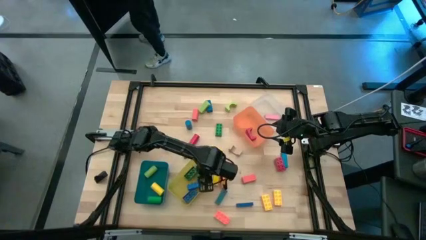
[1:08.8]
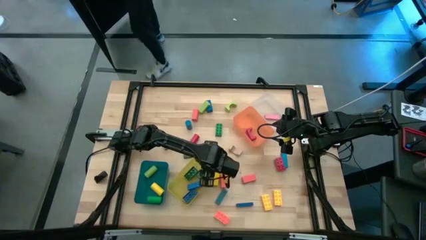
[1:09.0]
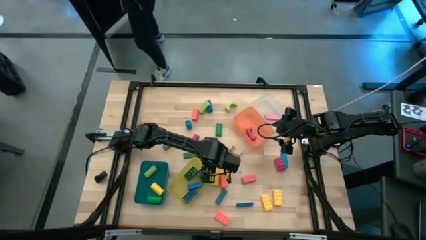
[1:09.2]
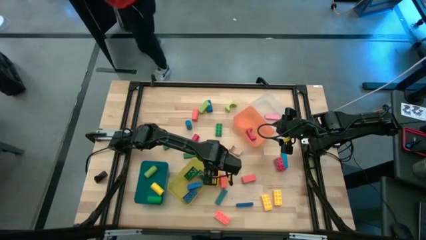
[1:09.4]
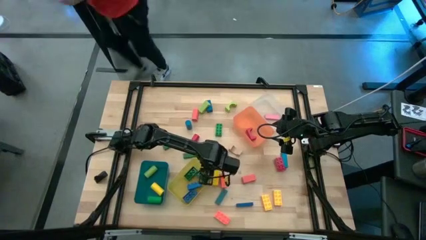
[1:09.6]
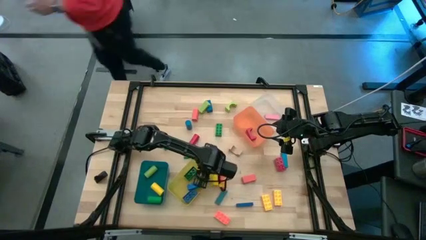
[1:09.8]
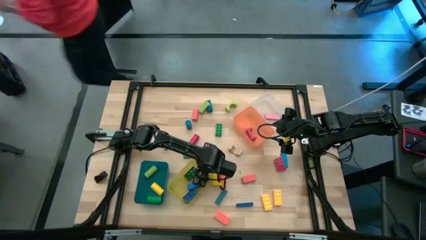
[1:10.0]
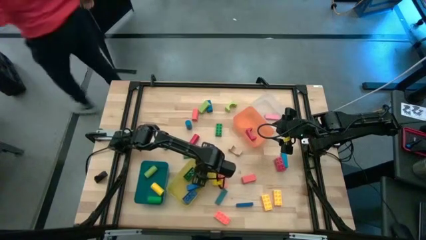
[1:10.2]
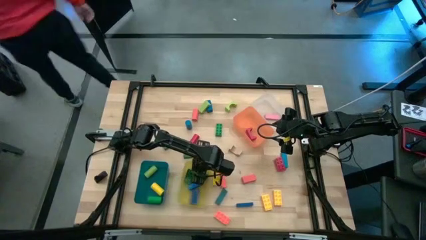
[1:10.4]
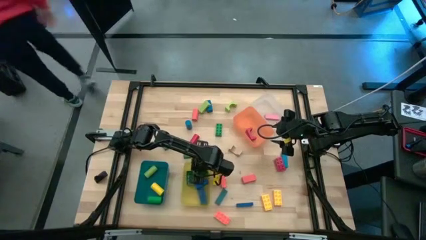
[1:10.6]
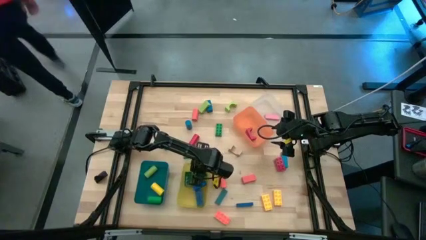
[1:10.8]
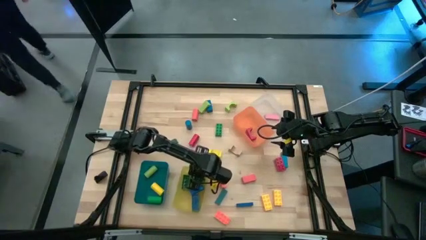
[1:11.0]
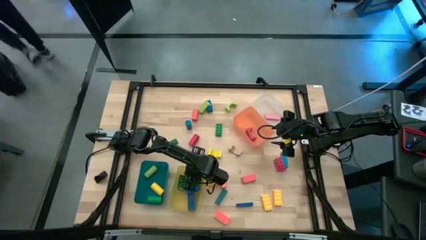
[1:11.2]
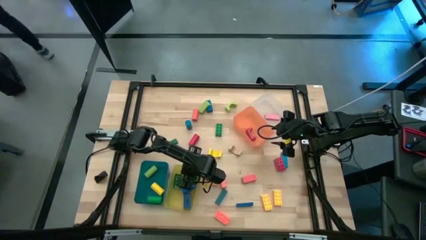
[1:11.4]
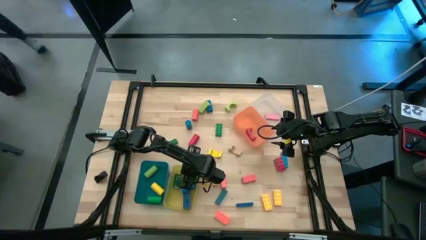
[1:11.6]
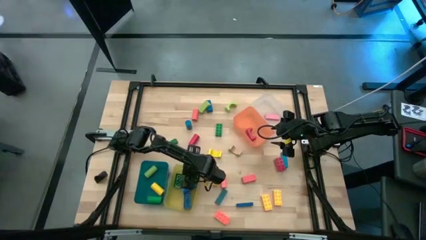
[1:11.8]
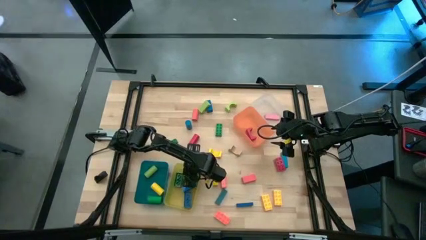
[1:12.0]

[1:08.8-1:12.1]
Task: Sort blocks by size
Adjust the yellow bin on the table

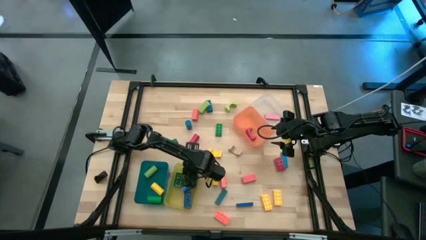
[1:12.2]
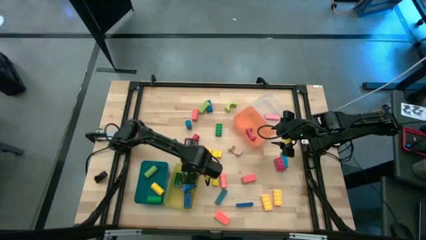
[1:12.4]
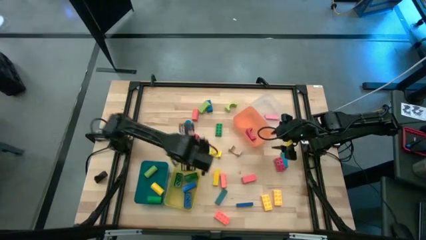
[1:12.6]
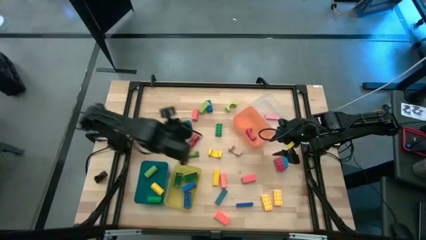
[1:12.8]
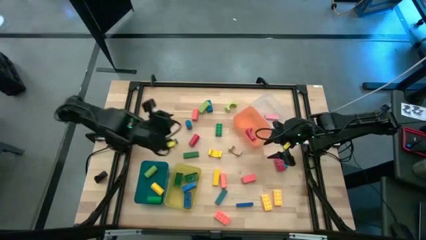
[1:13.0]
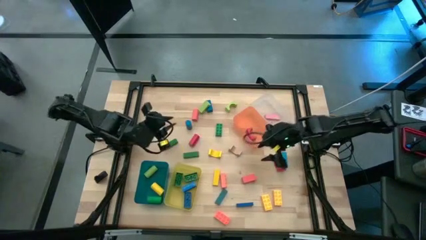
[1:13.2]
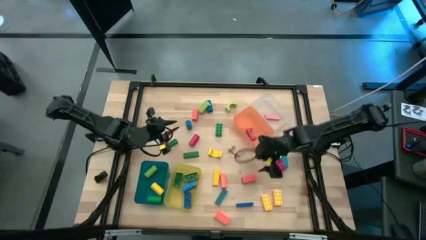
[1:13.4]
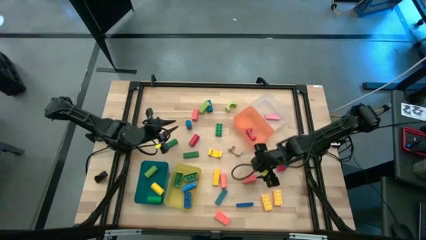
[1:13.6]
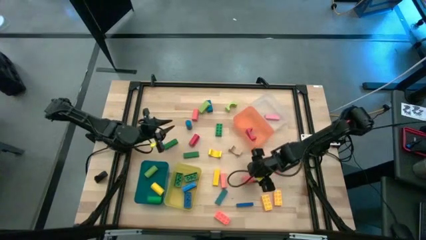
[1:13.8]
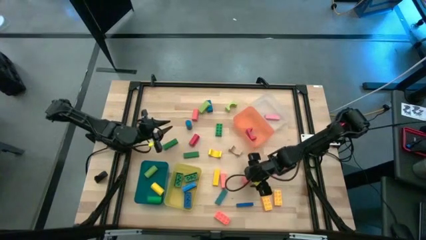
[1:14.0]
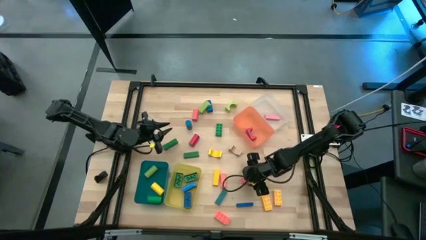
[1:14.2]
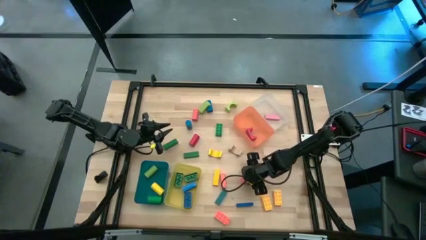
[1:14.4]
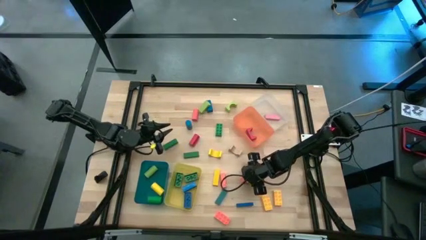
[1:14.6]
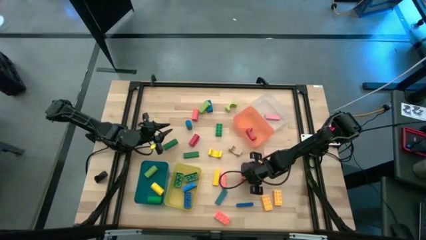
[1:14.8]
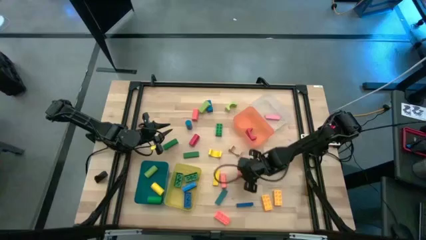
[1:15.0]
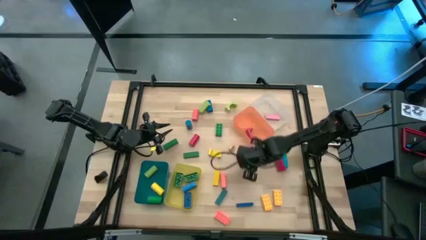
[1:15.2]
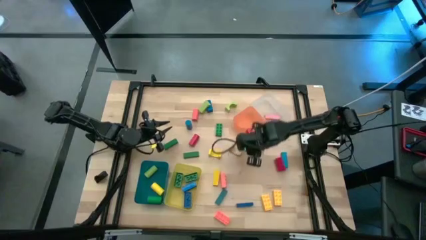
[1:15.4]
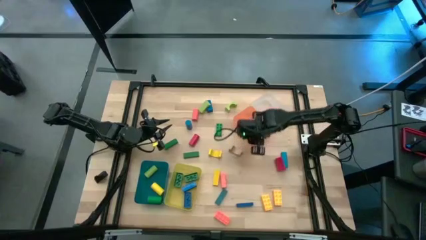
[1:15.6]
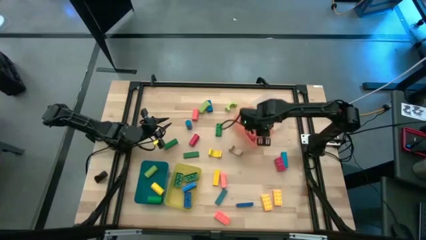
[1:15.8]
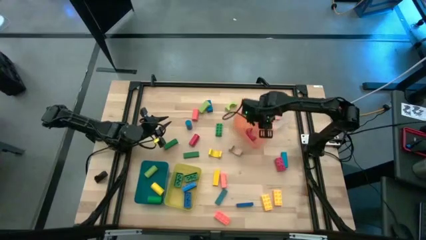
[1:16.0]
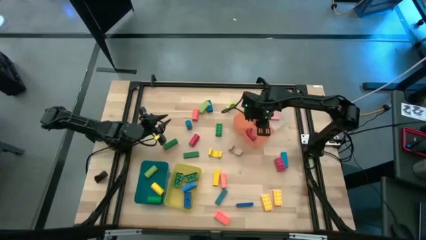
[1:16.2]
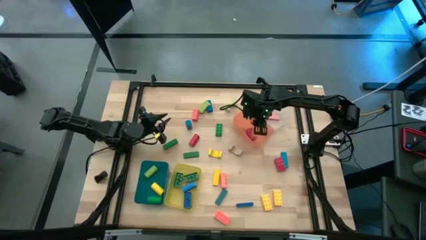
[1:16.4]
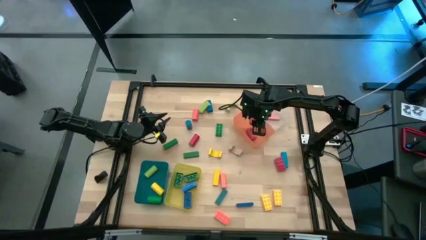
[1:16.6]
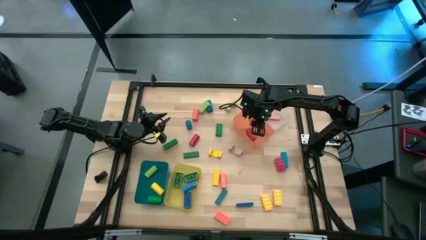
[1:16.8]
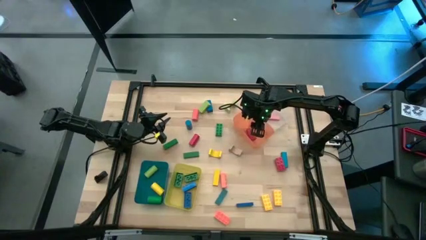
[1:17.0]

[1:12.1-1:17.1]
Put the orange rectangle block into the orange bin

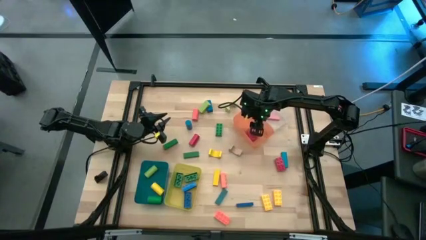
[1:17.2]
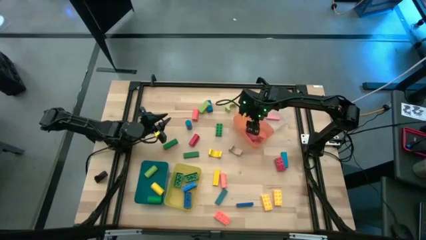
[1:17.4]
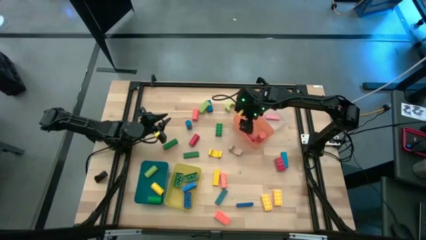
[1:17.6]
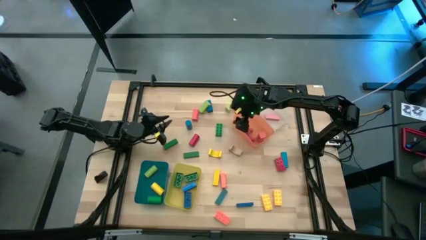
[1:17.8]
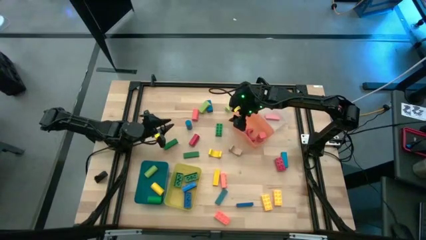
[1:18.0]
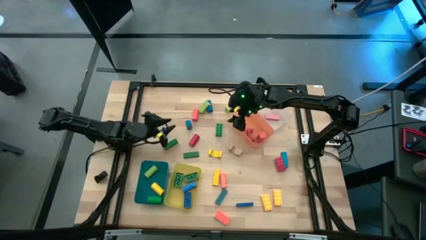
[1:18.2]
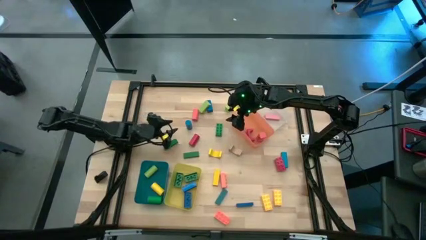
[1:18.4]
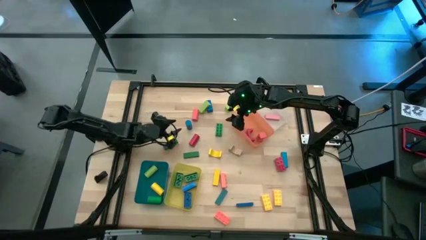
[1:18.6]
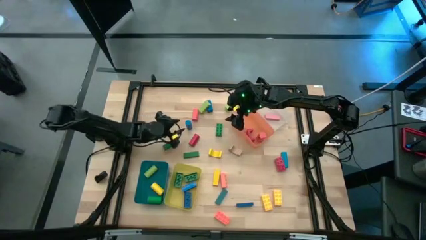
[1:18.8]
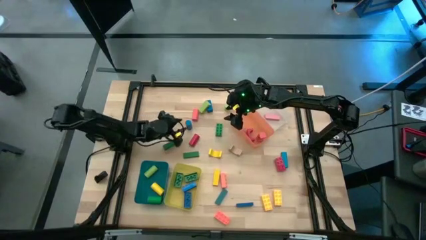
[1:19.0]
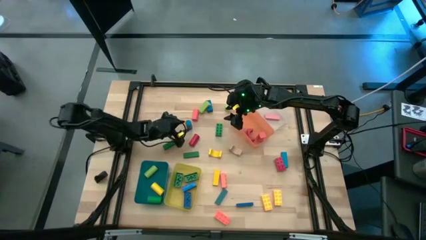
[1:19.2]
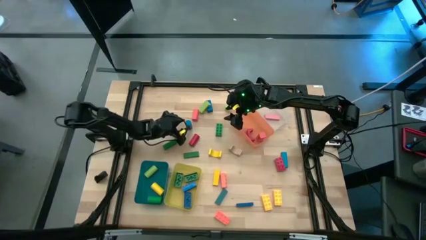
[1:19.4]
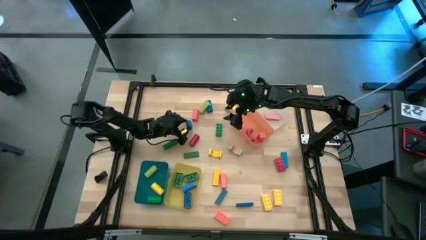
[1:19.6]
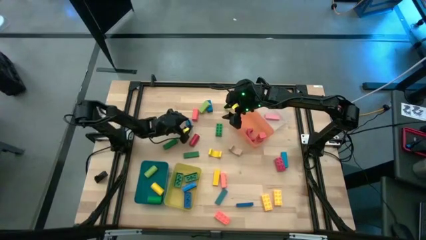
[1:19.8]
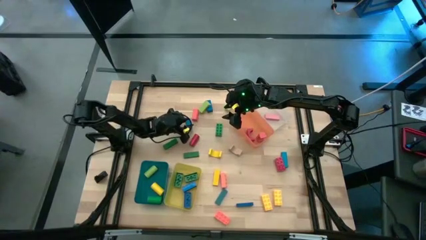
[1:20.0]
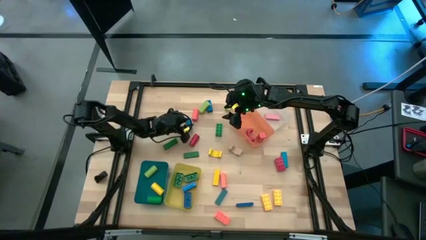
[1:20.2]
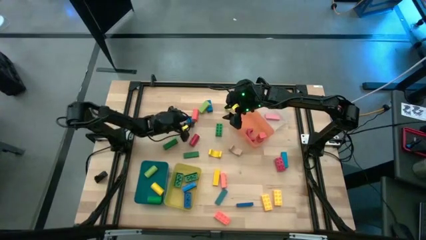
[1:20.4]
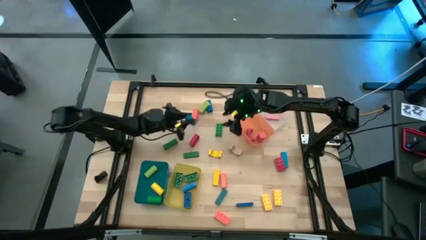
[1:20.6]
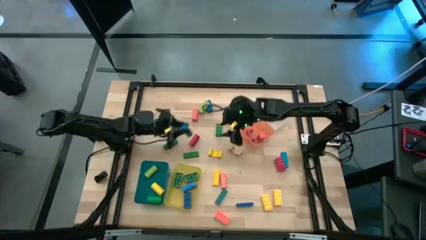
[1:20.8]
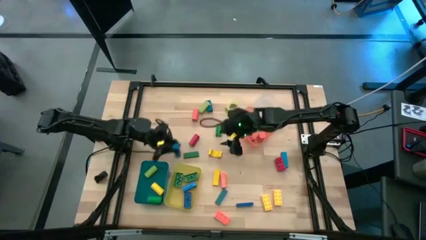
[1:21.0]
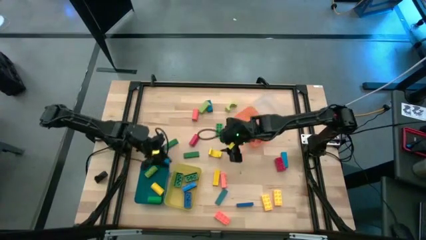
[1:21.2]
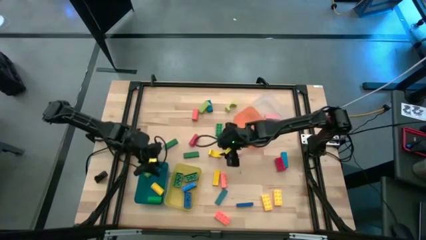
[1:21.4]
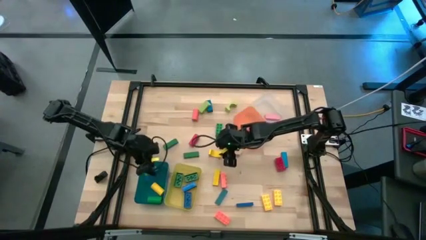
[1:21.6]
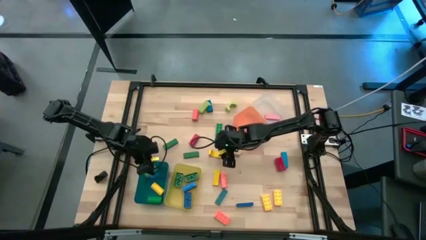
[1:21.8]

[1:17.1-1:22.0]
Put the blue cylinder block into the blue bin

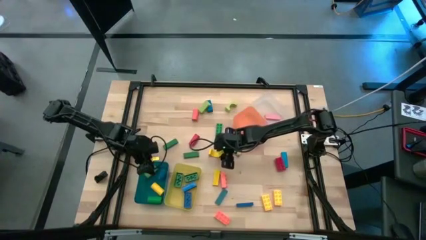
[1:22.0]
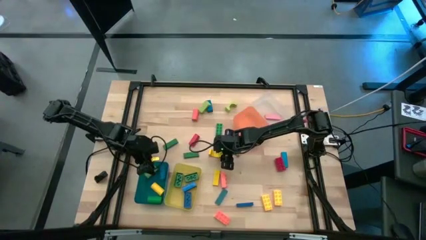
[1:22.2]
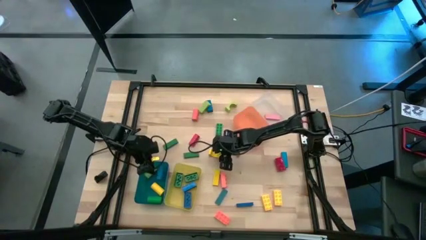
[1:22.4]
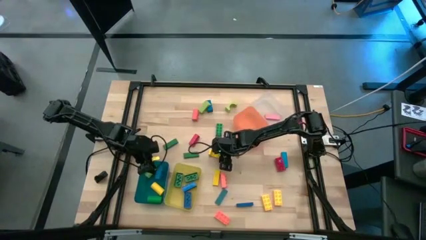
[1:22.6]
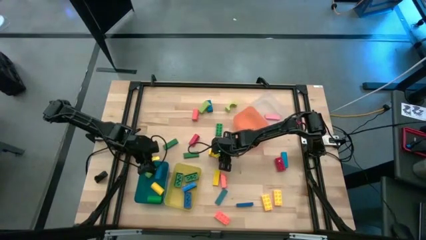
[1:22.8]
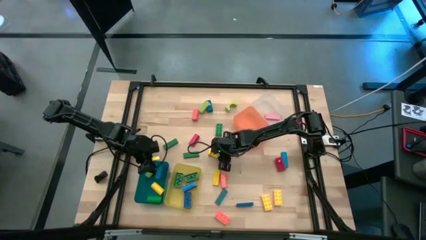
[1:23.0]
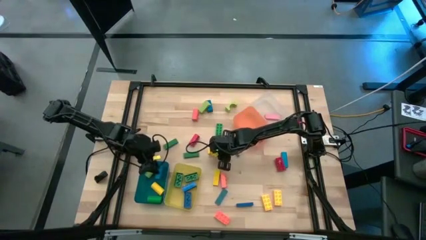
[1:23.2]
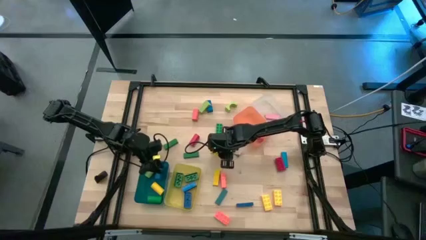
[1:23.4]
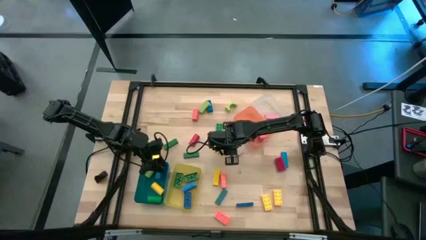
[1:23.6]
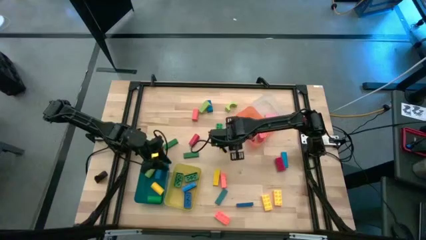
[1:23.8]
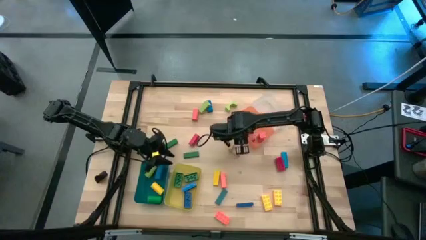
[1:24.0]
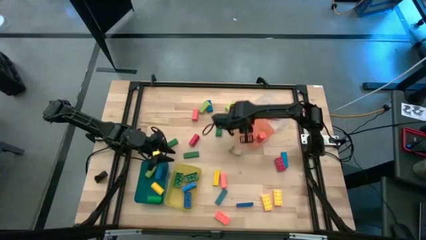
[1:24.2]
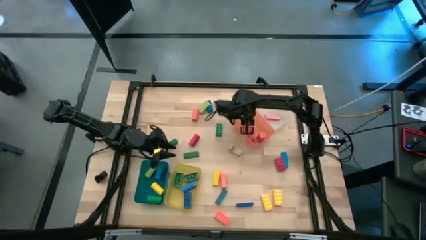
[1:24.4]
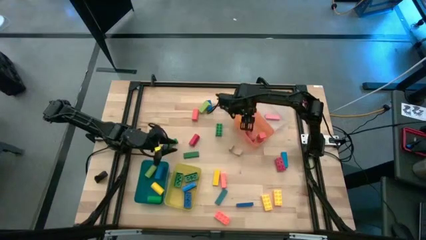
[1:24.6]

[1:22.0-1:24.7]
Put the yellow arch block into the orange bin

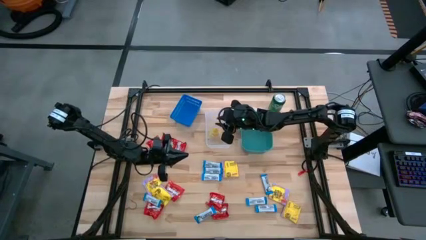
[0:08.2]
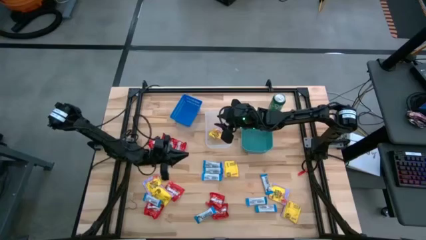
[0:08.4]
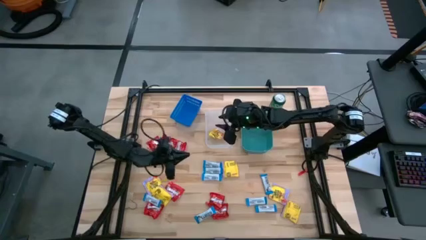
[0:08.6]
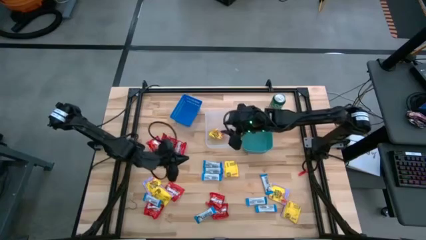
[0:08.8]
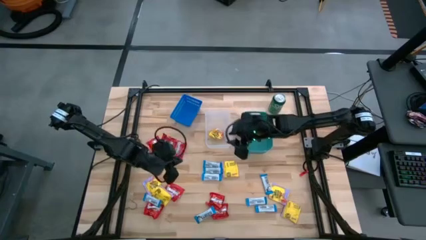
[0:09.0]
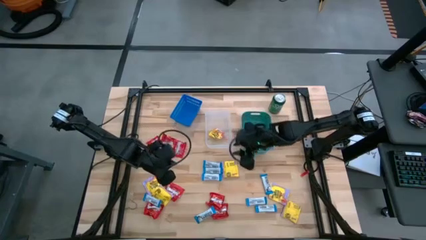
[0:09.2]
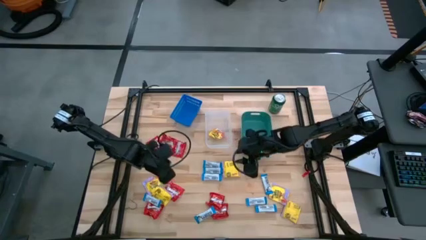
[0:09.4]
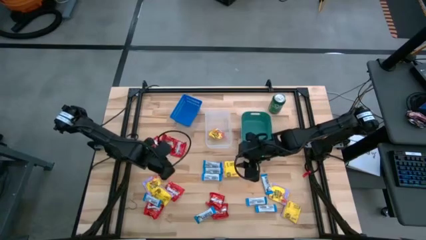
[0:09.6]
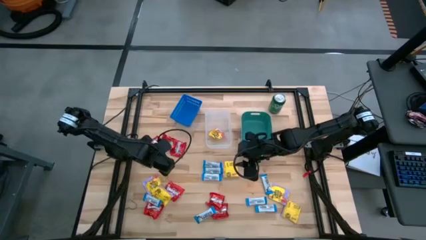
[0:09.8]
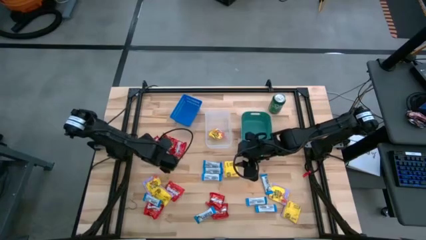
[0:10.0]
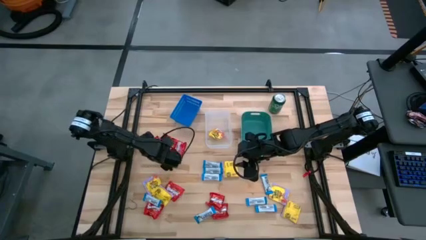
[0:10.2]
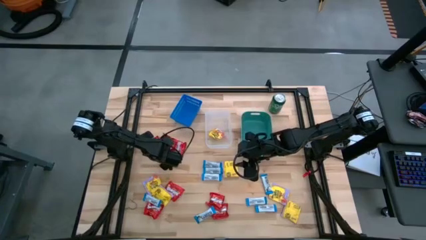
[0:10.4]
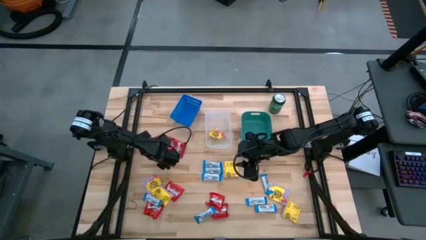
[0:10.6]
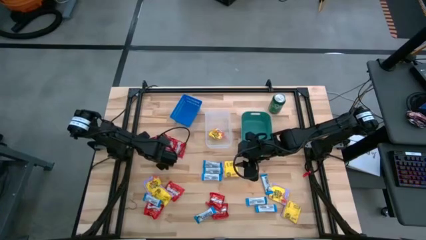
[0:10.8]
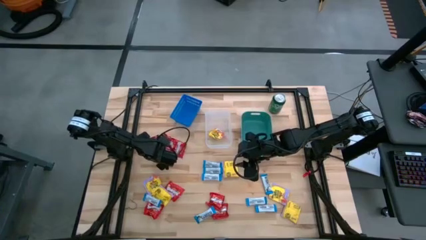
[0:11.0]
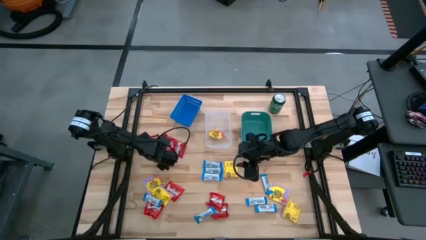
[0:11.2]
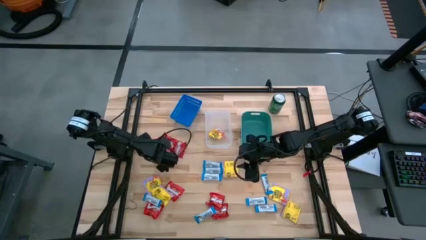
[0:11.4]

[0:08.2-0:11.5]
Task: Sort candy
Put the red candy into the green bin
